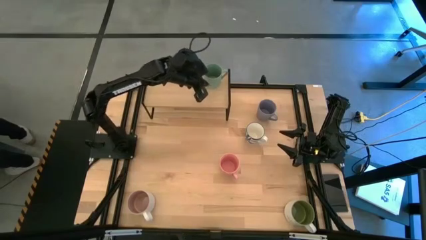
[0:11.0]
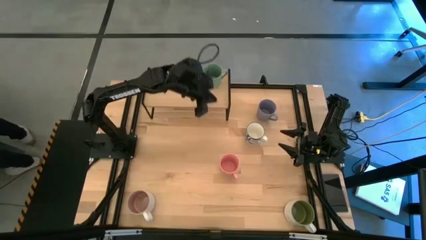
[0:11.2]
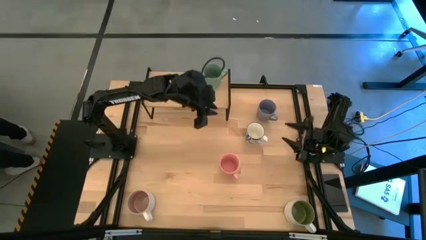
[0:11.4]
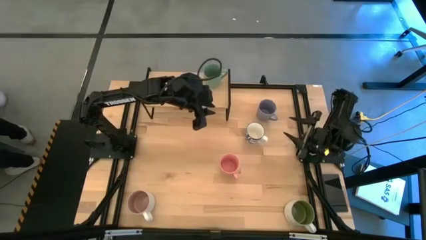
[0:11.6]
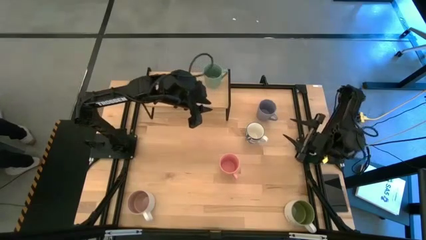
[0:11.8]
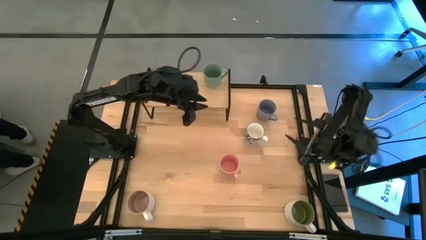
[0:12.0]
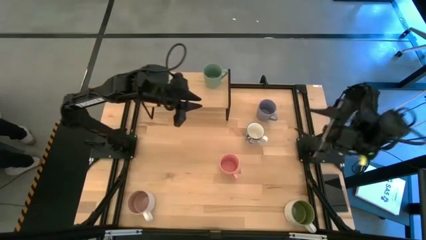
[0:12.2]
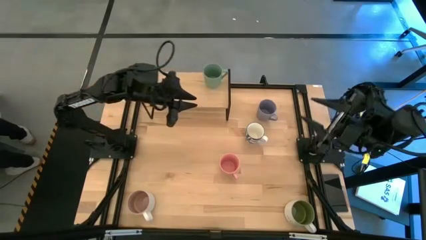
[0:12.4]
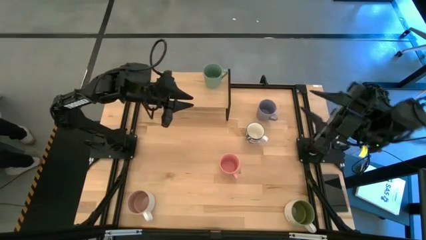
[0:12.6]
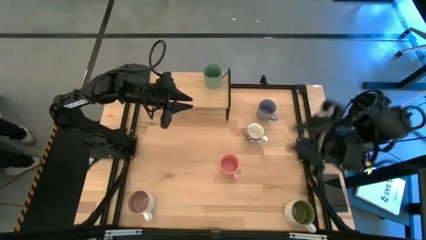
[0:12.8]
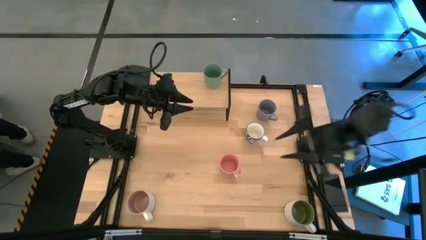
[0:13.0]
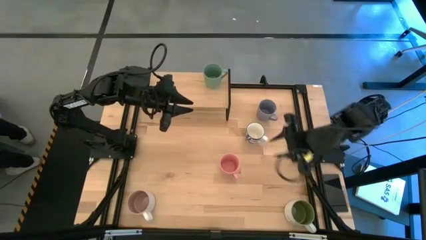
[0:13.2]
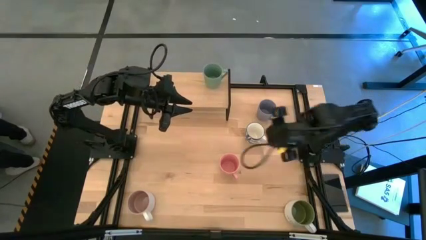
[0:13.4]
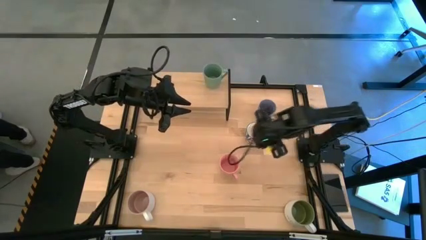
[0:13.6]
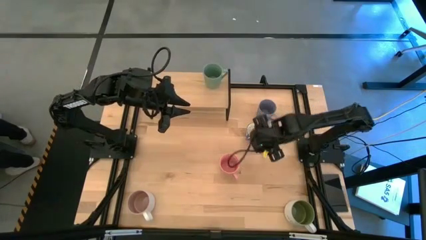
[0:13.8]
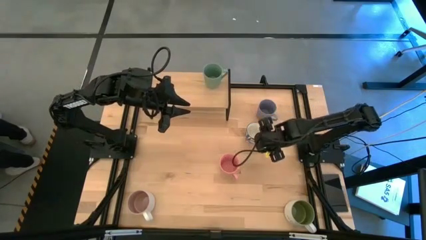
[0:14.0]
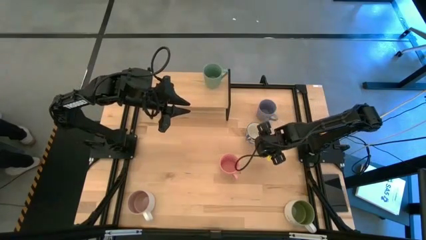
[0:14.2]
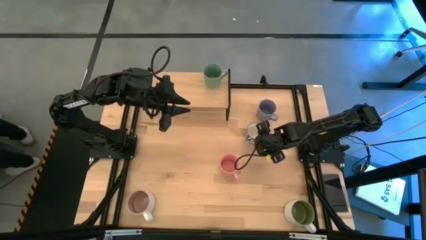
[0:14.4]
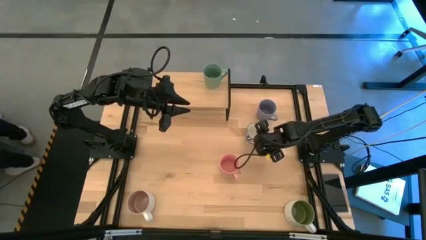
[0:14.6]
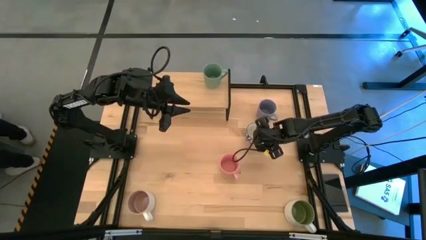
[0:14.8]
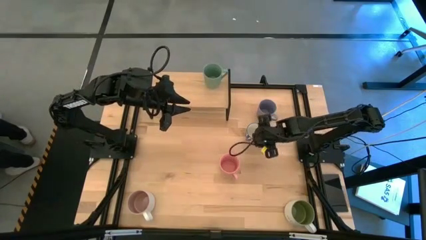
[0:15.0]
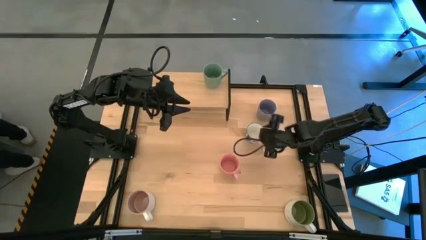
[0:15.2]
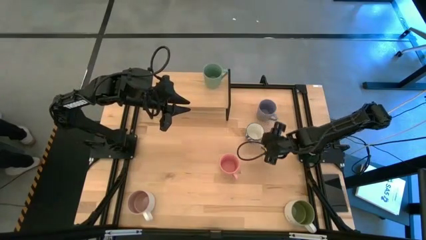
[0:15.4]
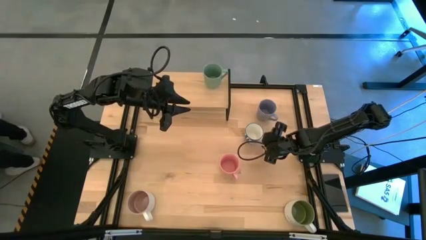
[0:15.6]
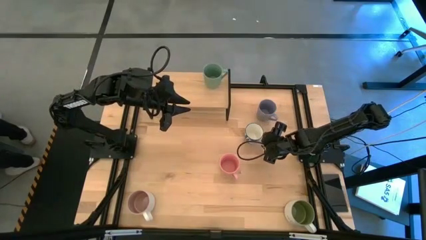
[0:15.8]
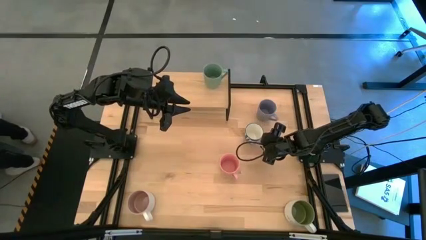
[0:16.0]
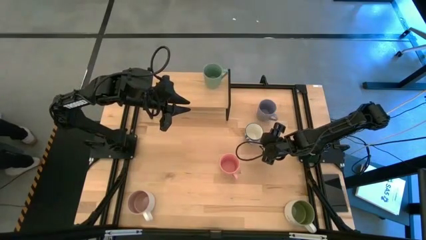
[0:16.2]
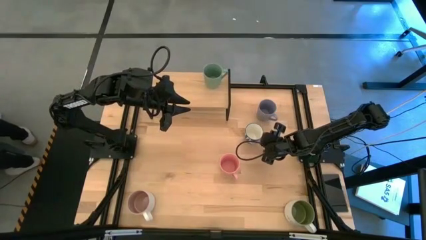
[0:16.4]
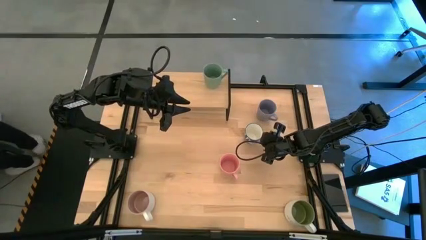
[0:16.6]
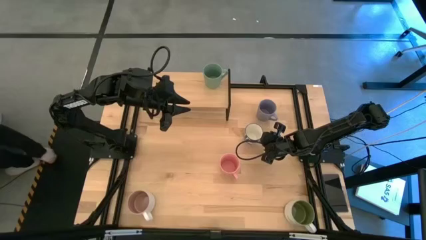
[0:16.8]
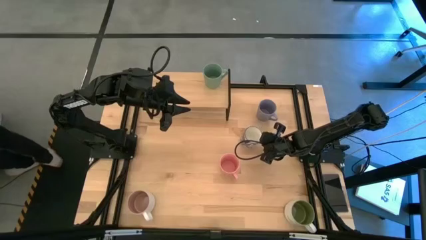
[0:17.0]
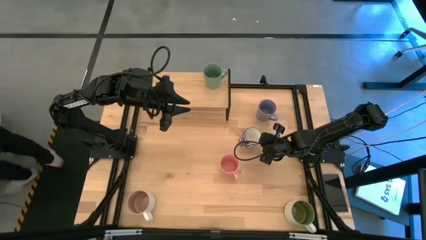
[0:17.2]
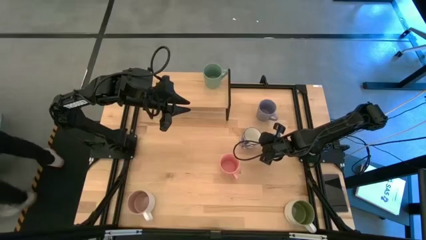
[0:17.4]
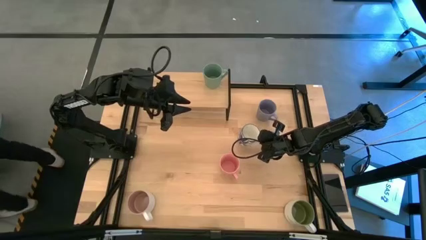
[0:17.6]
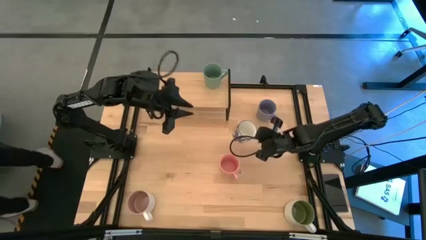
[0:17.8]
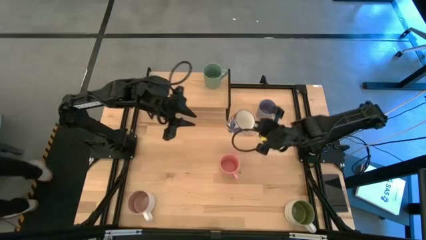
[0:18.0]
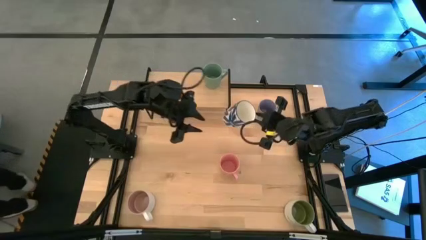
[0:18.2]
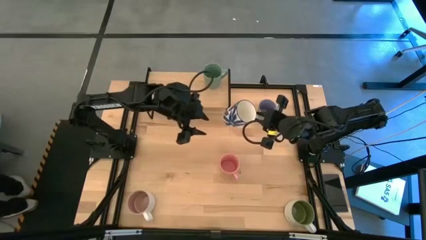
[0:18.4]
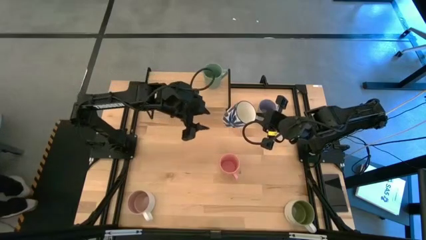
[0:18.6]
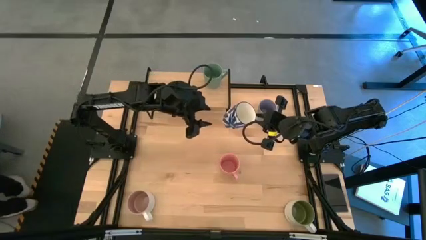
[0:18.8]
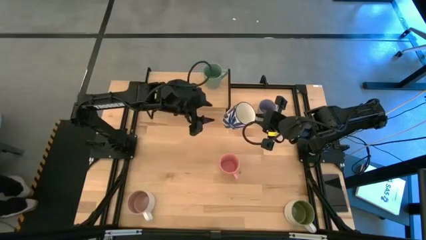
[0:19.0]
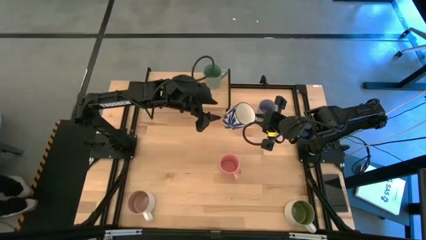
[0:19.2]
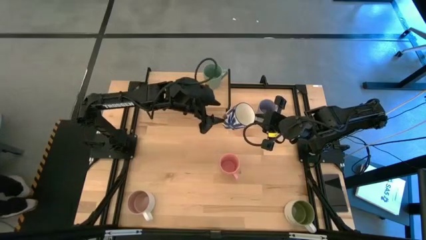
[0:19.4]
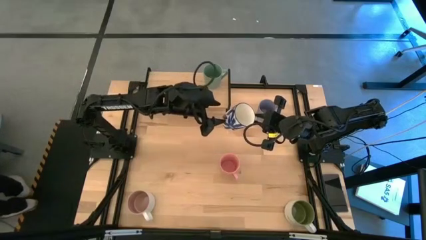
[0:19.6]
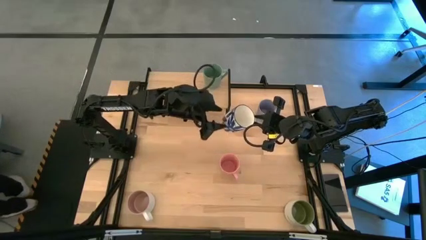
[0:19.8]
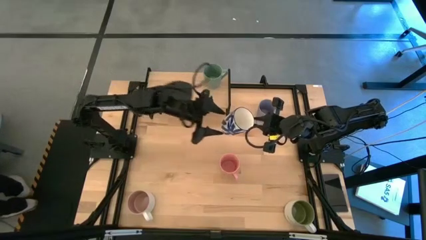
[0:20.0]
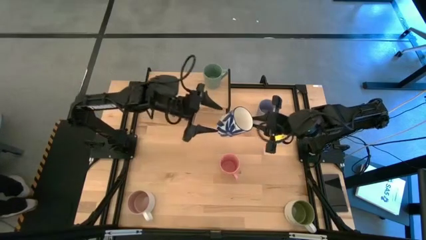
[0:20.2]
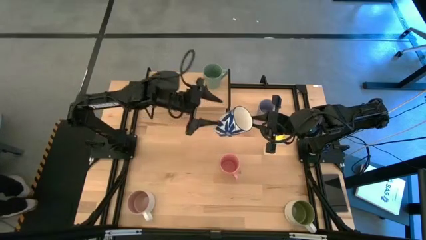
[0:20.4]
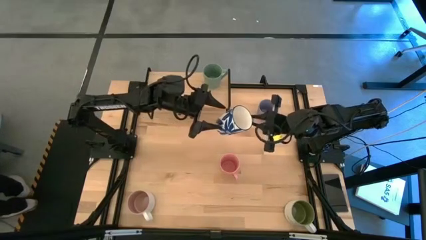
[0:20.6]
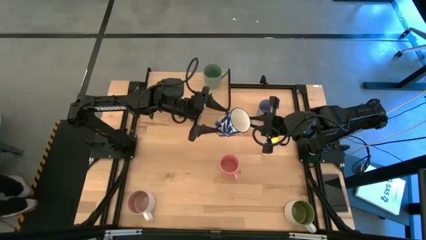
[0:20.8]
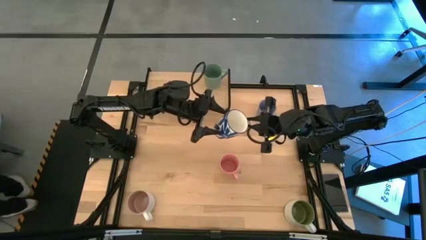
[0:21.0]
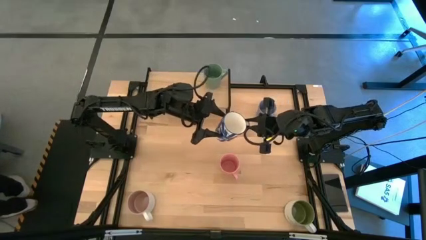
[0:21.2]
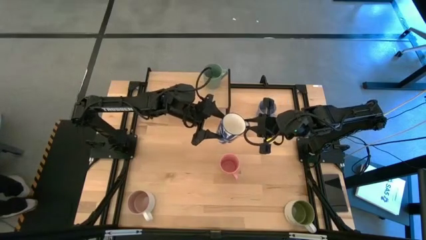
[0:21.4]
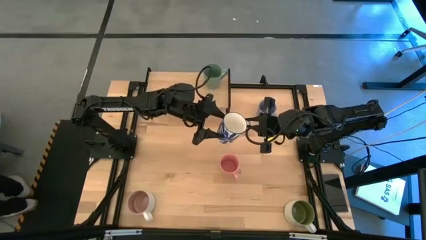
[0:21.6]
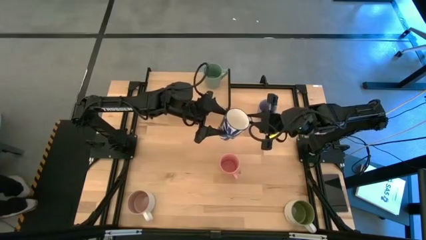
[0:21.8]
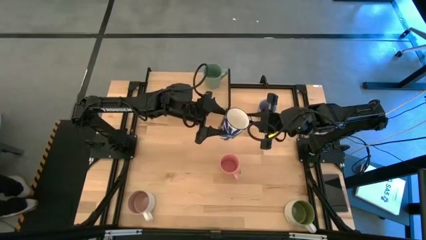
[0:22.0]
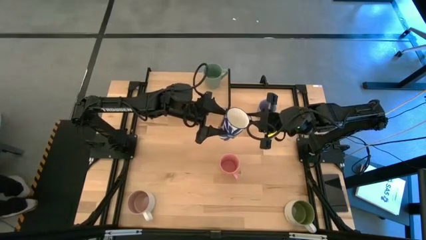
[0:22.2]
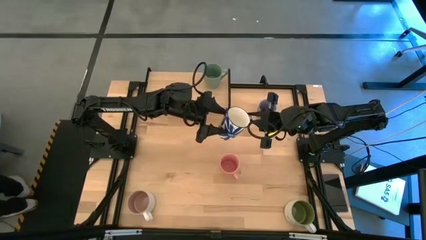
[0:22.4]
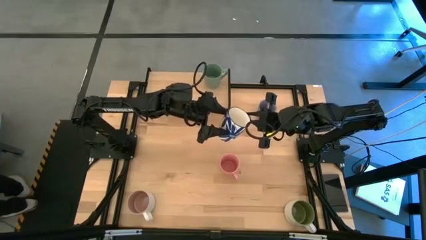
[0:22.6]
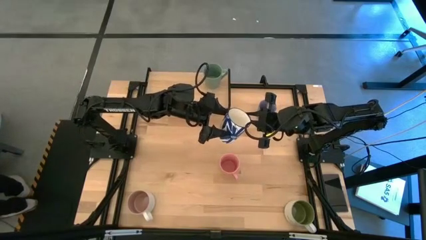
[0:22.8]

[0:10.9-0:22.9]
Task: Place coffee mugs
Put the white blue on the shelf

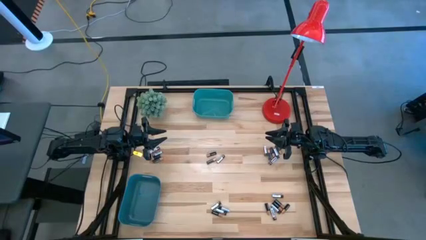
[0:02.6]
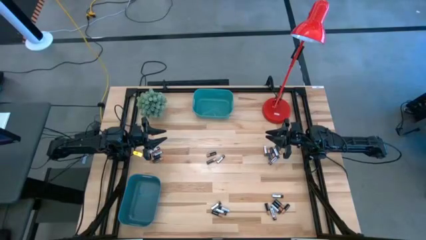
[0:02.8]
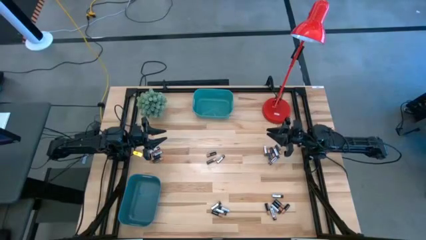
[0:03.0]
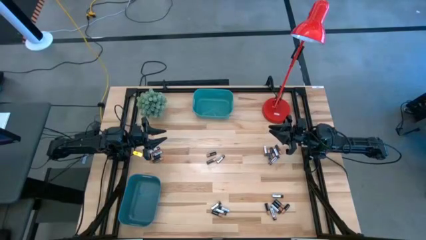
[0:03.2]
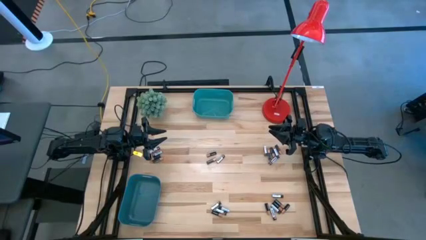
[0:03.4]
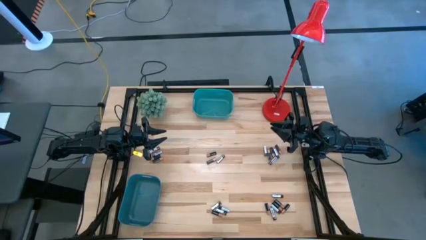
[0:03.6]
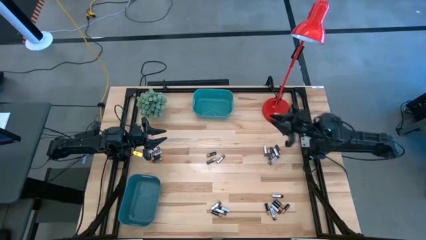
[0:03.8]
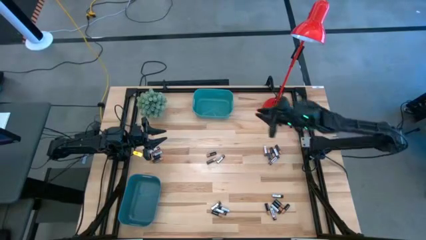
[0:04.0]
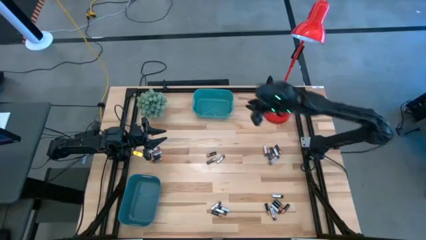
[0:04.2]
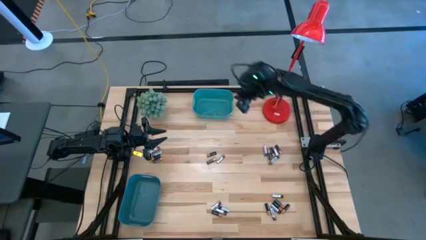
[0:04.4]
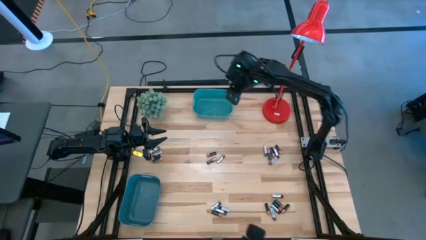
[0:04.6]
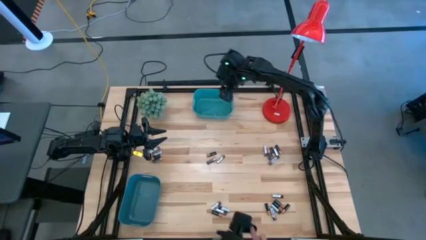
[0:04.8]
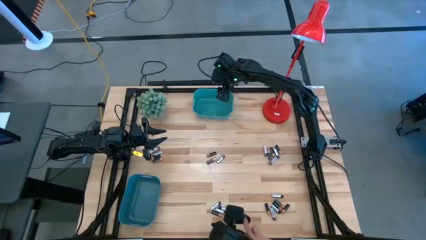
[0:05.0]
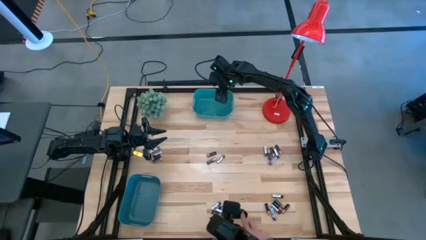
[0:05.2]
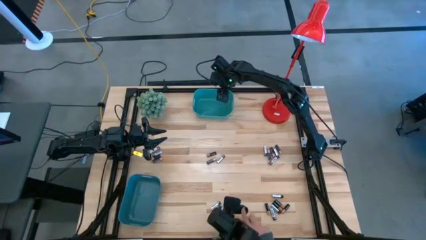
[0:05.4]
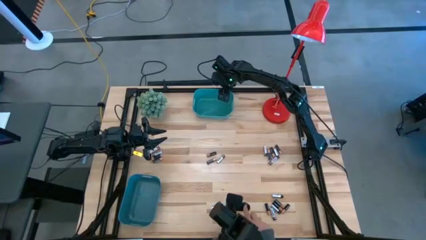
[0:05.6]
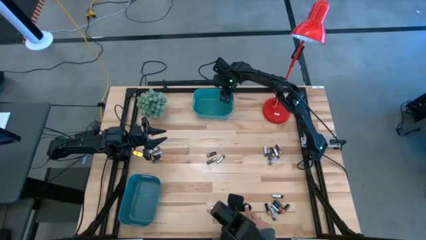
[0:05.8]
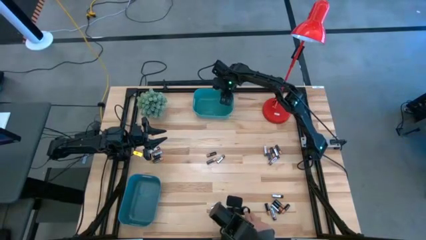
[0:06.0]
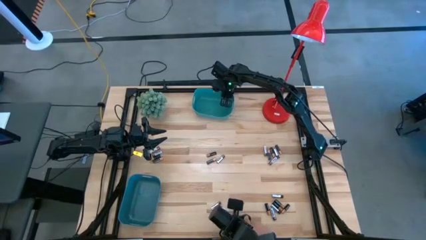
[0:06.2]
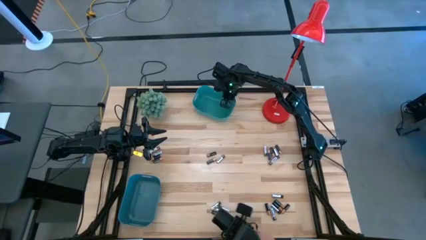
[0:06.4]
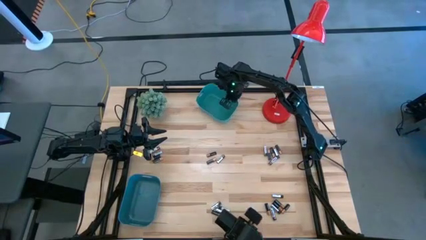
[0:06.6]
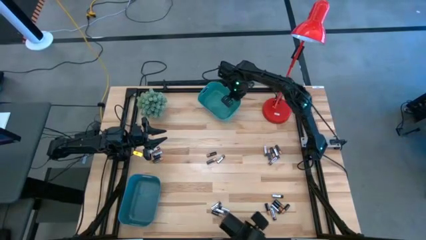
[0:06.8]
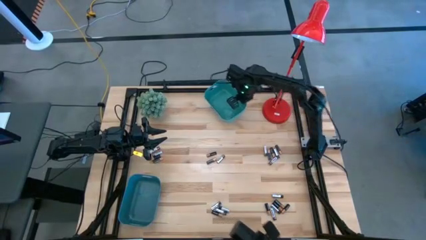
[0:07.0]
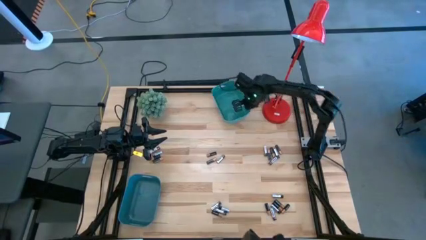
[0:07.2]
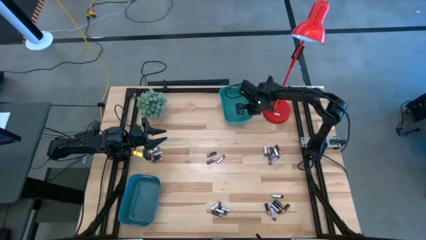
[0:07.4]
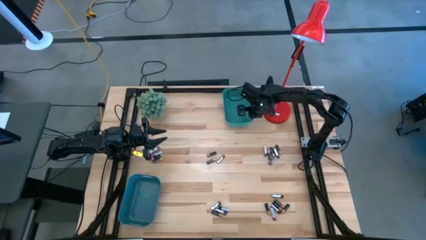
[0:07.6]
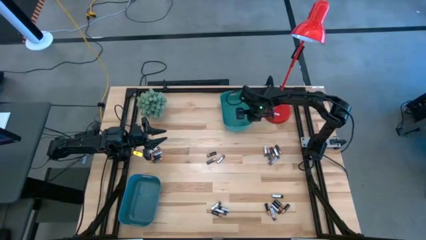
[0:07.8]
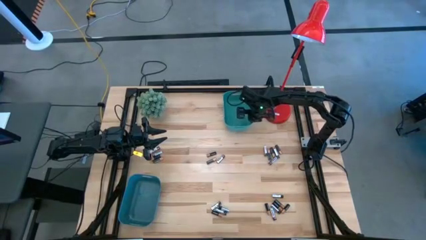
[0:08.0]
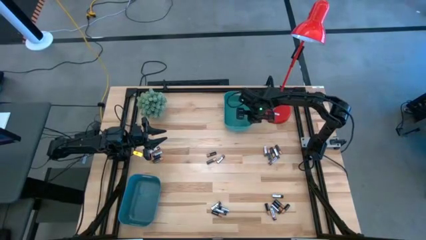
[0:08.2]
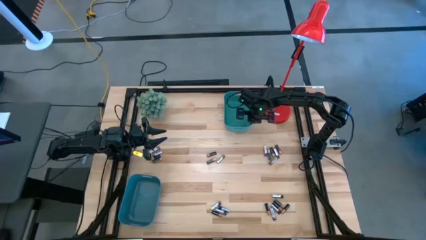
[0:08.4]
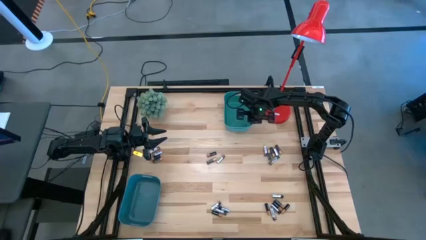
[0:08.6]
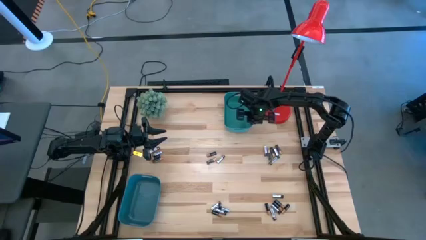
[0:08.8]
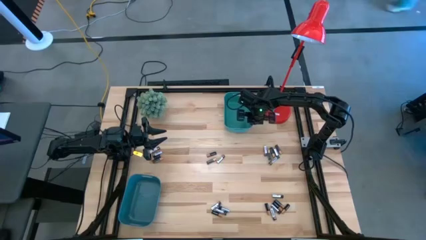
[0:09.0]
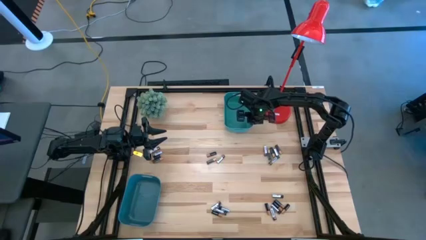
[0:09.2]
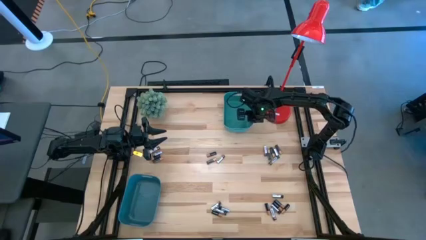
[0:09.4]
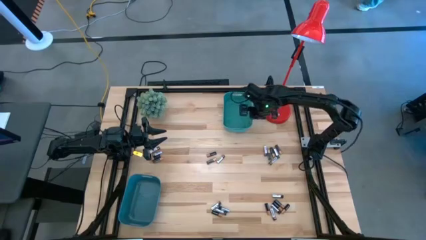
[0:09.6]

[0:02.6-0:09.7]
Task: Sort batteries
Adjust the green bin
